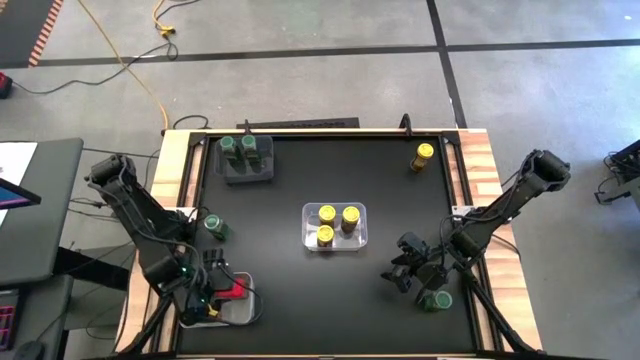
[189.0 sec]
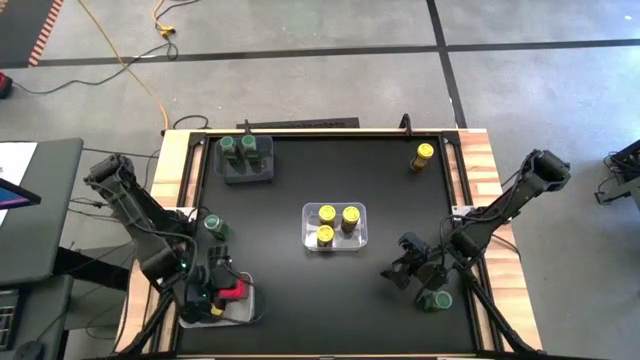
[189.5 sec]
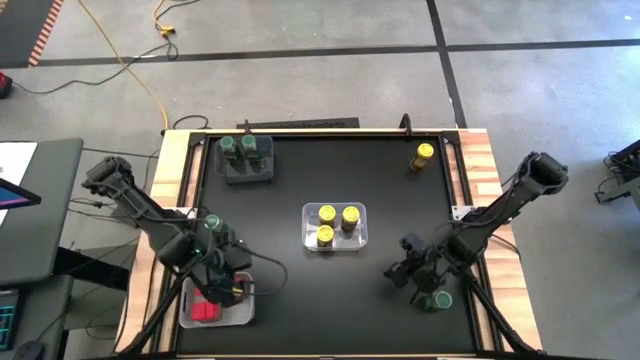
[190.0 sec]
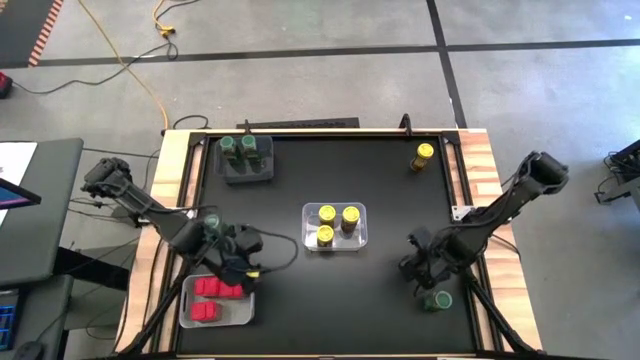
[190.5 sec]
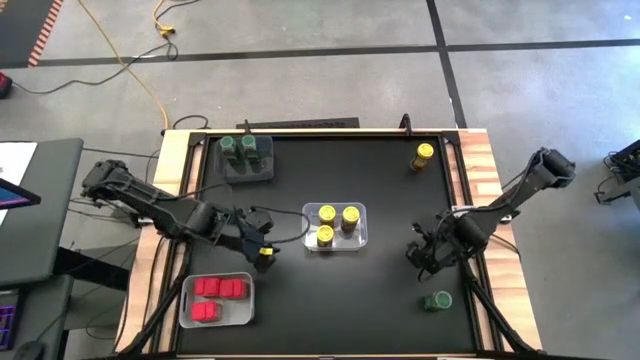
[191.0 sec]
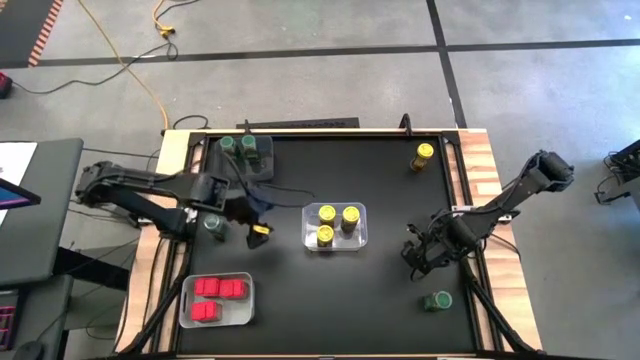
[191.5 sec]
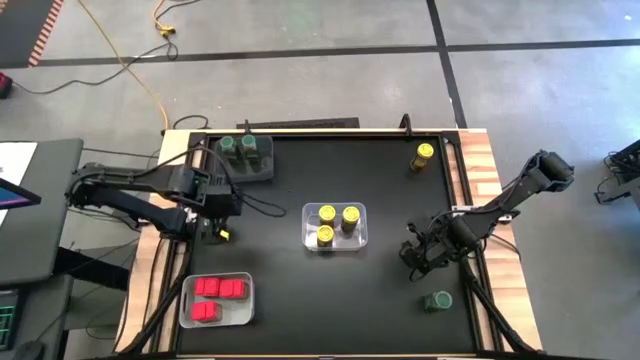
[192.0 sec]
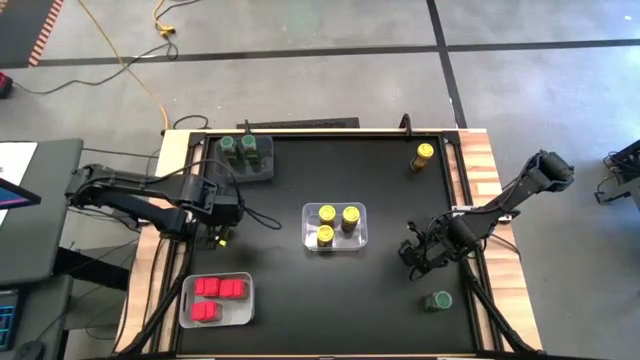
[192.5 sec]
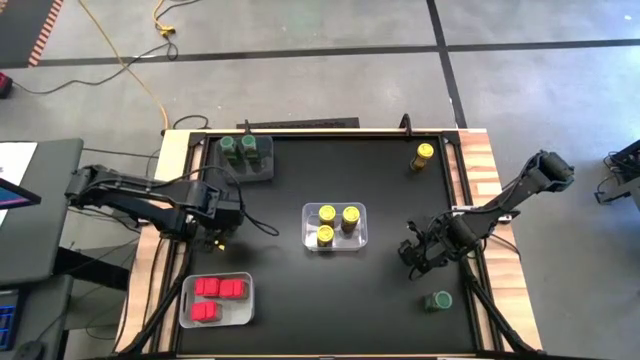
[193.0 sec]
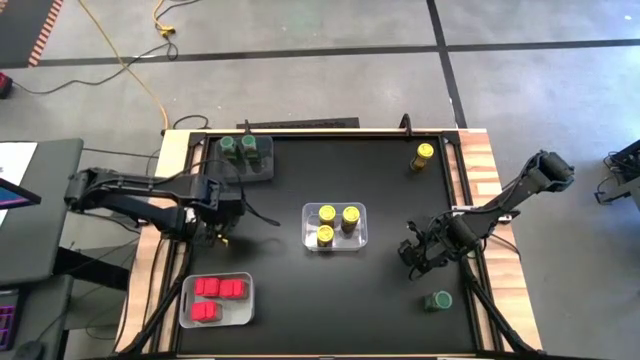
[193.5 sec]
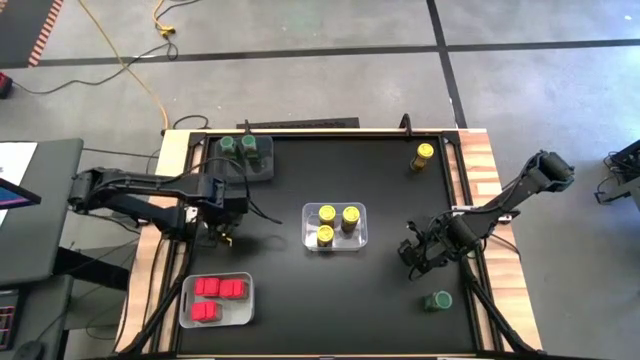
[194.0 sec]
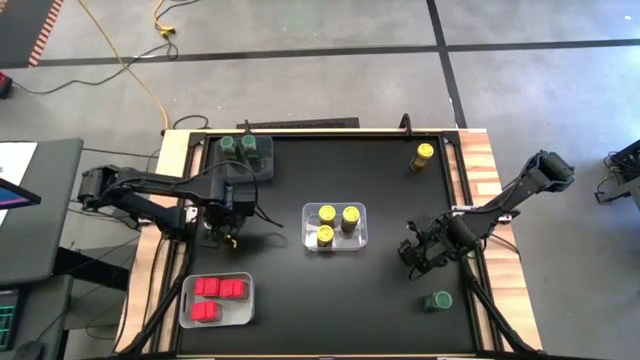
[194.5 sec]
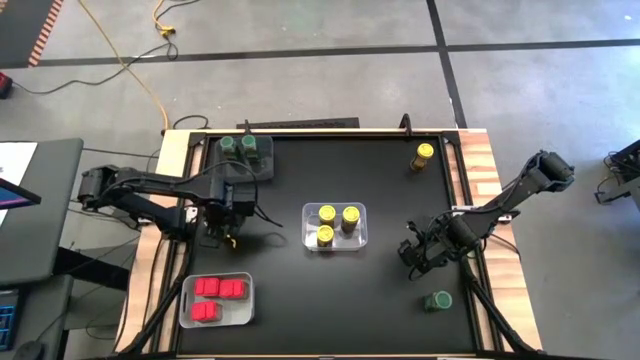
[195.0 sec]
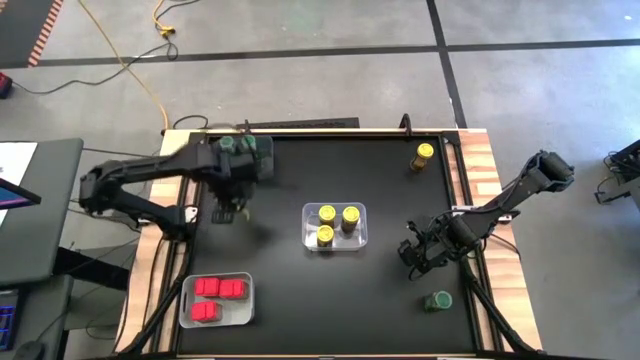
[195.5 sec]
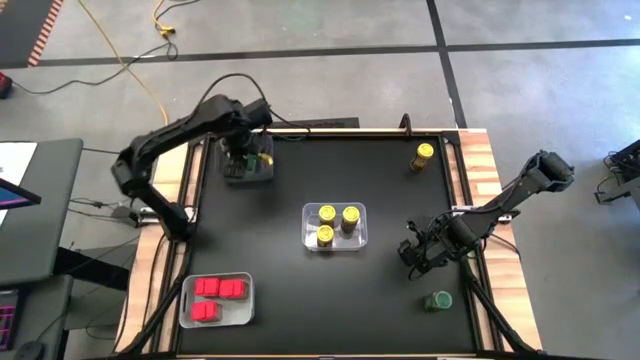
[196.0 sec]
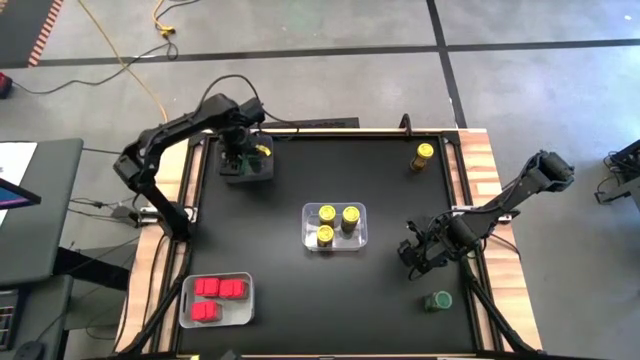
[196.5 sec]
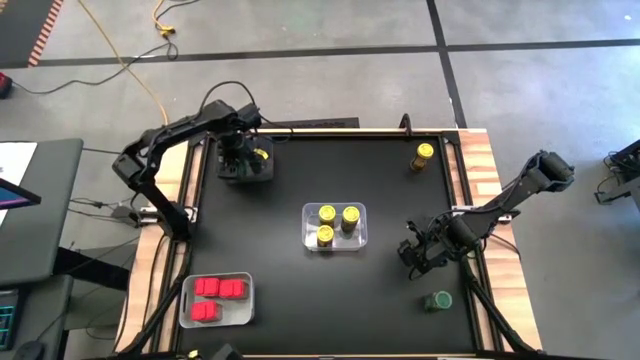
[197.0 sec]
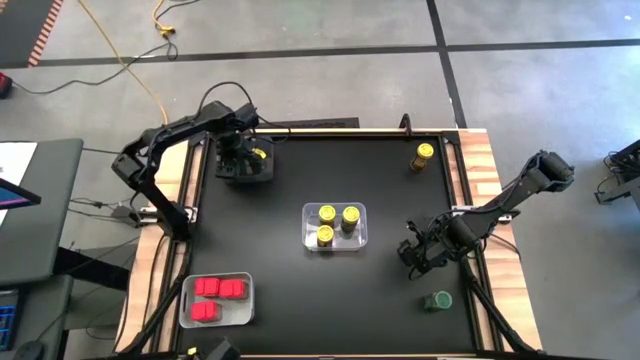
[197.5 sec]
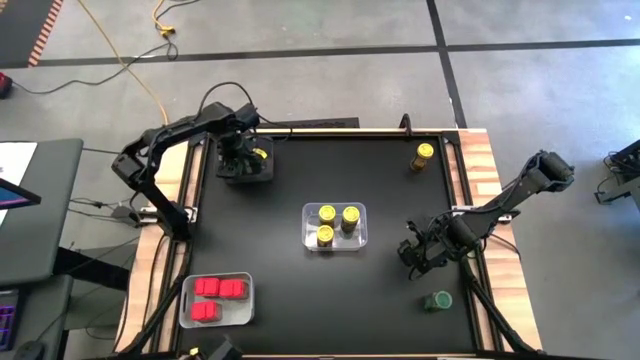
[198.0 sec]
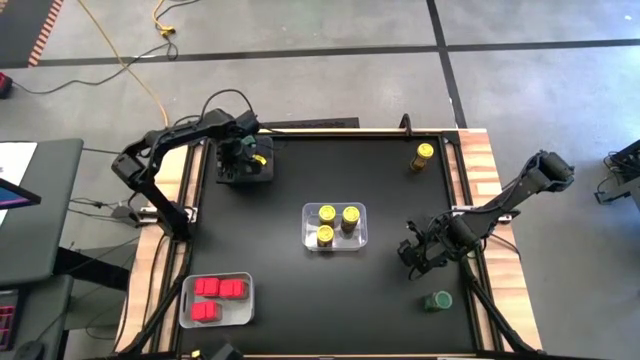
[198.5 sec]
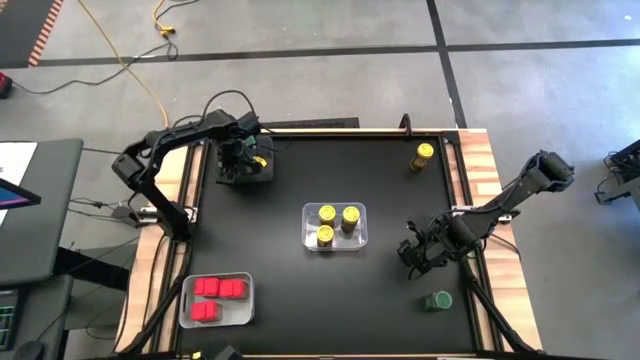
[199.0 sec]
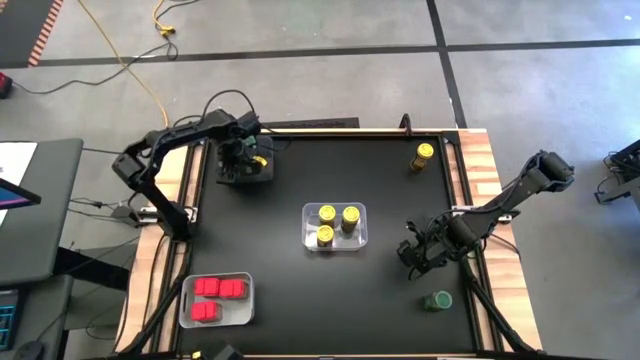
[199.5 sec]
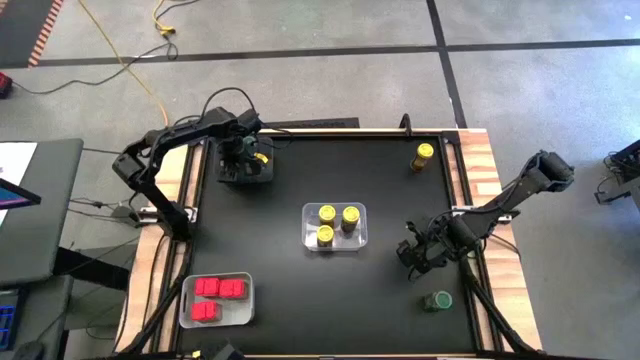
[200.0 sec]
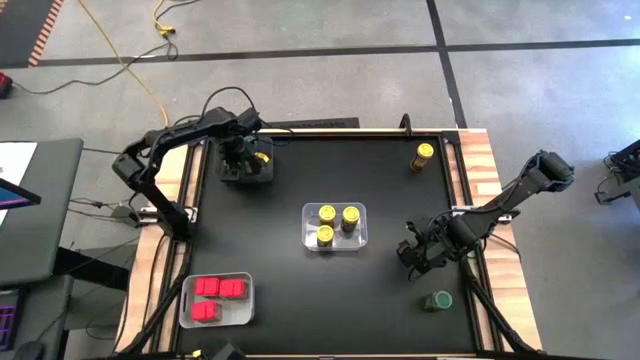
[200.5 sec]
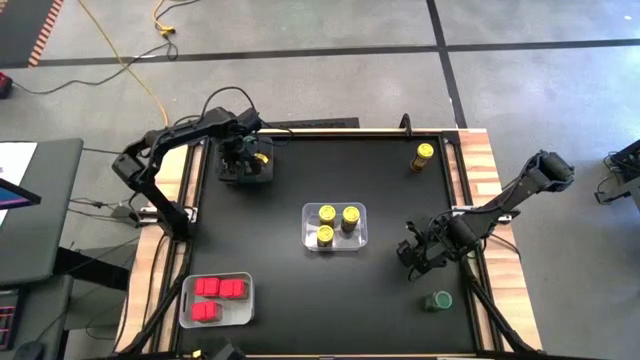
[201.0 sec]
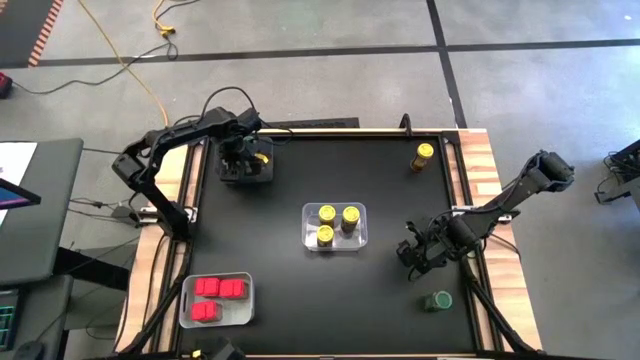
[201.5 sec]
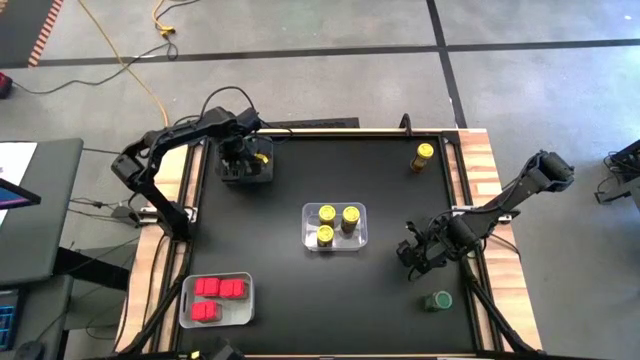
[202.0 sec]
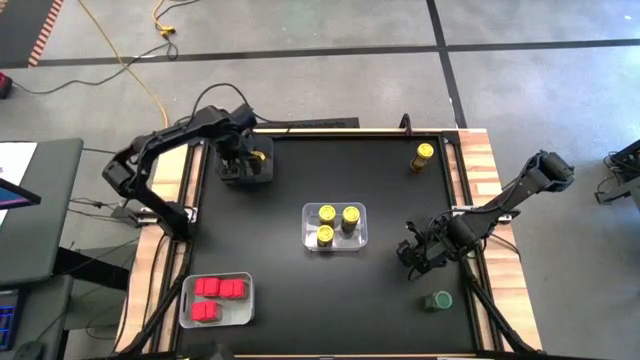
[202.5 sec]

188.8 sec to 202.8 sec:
Task: Sort spices by type
Put the green seasoning bottle into the transparent bin

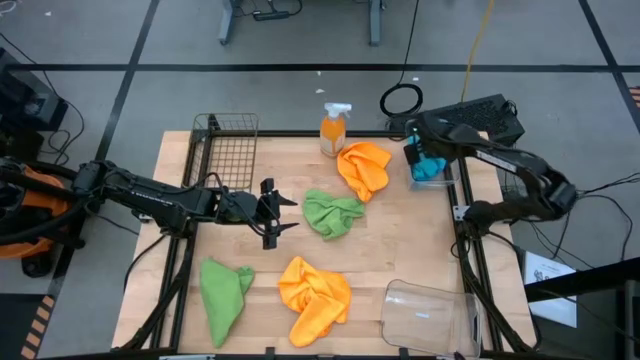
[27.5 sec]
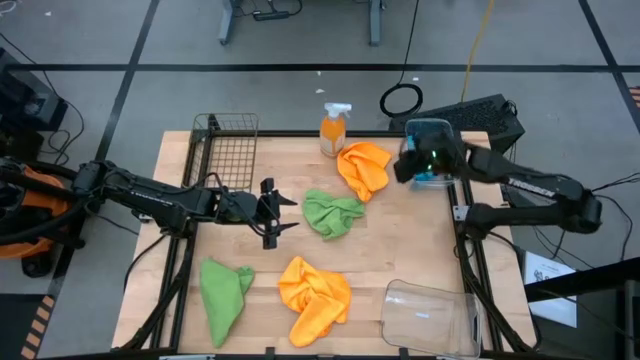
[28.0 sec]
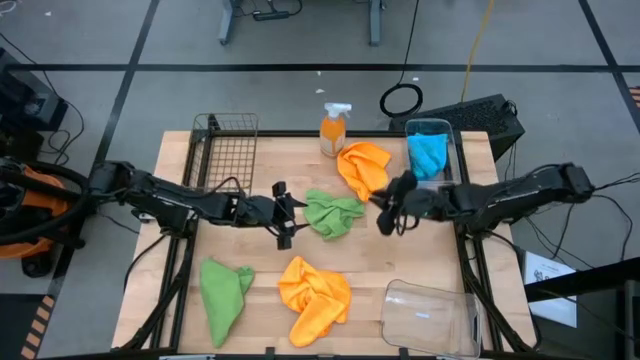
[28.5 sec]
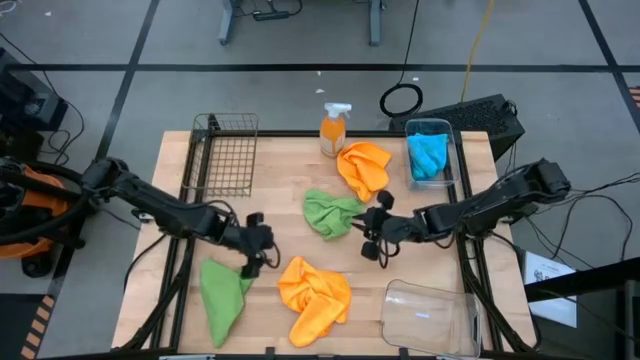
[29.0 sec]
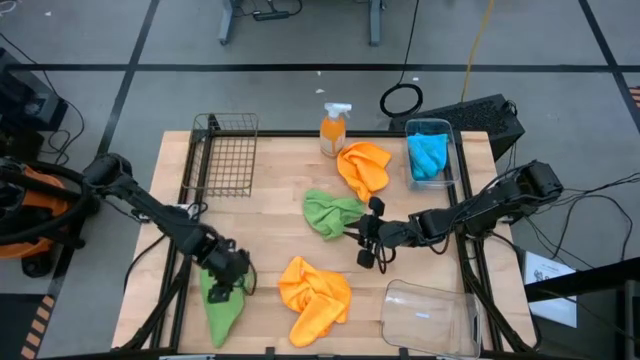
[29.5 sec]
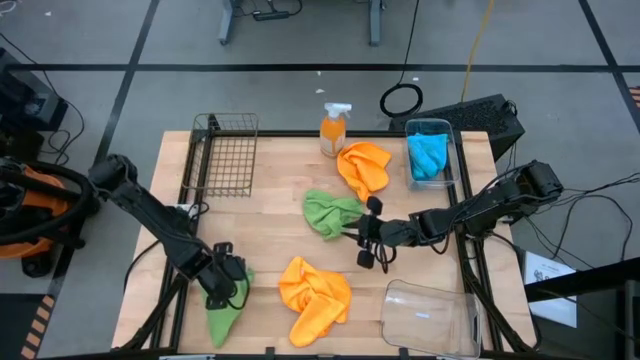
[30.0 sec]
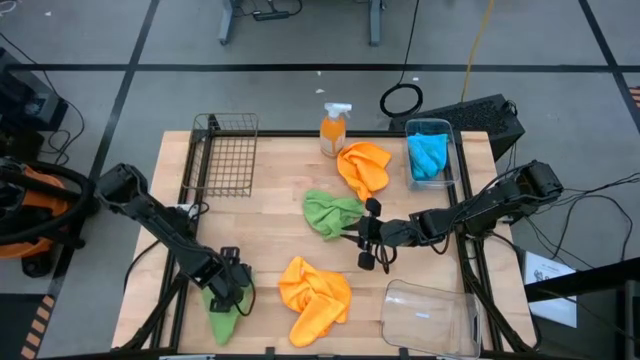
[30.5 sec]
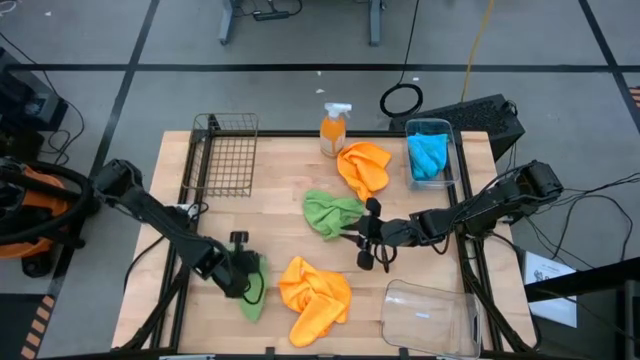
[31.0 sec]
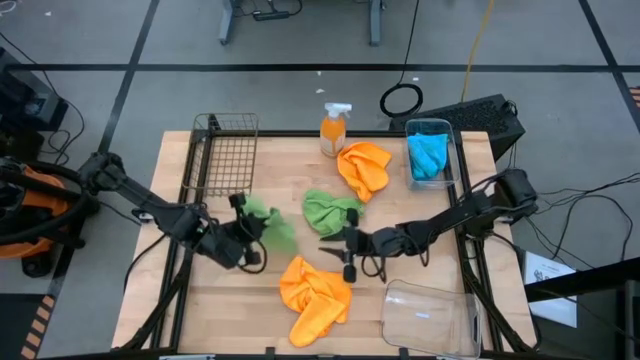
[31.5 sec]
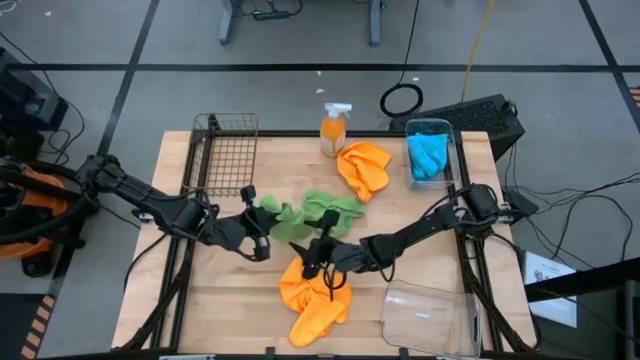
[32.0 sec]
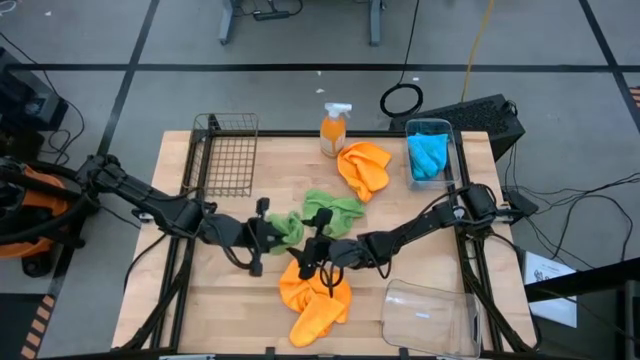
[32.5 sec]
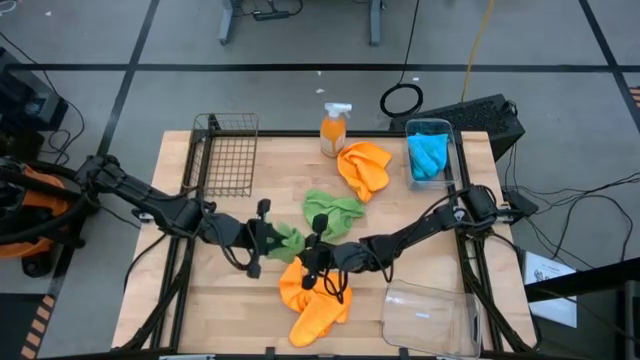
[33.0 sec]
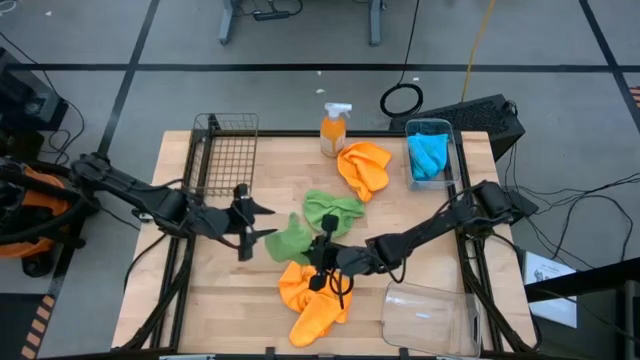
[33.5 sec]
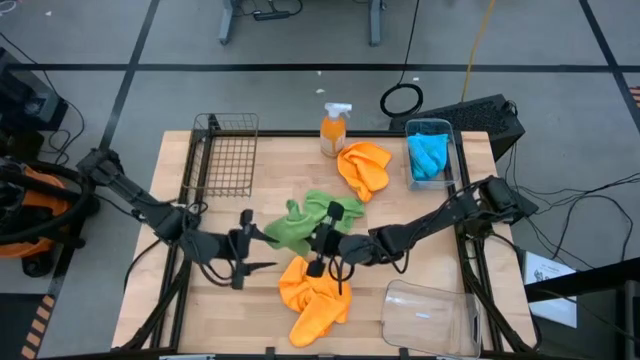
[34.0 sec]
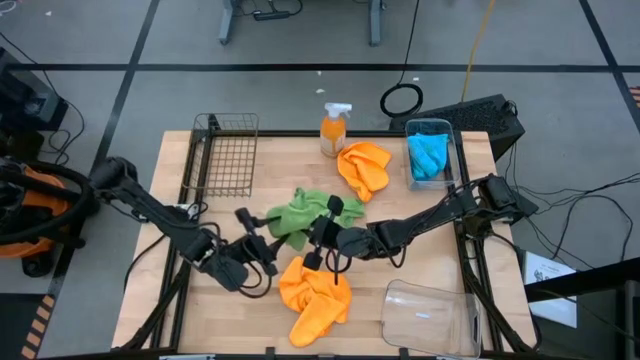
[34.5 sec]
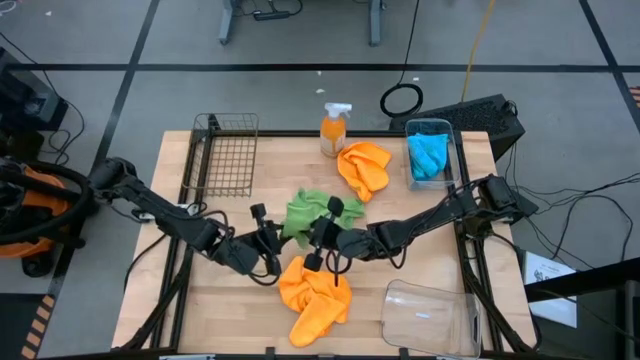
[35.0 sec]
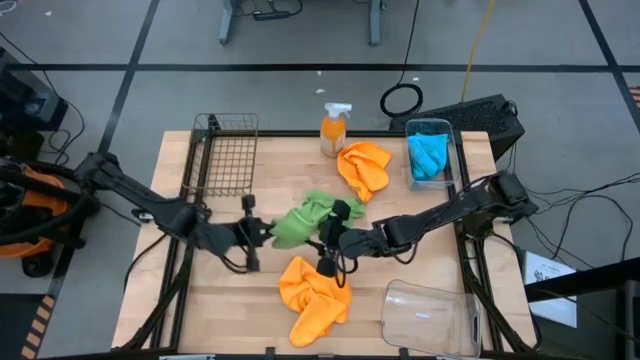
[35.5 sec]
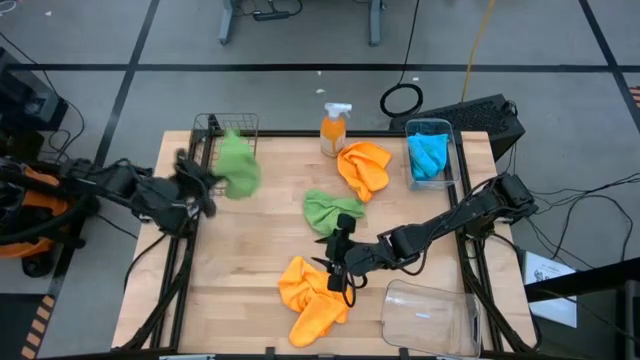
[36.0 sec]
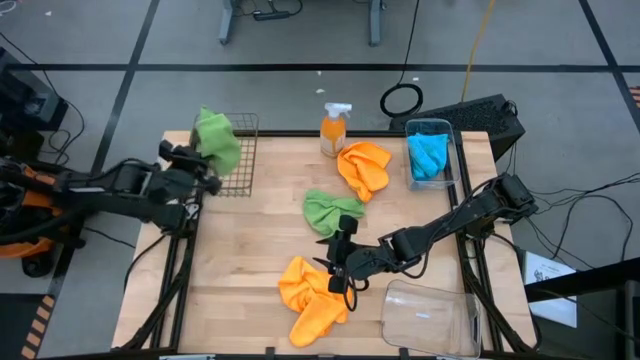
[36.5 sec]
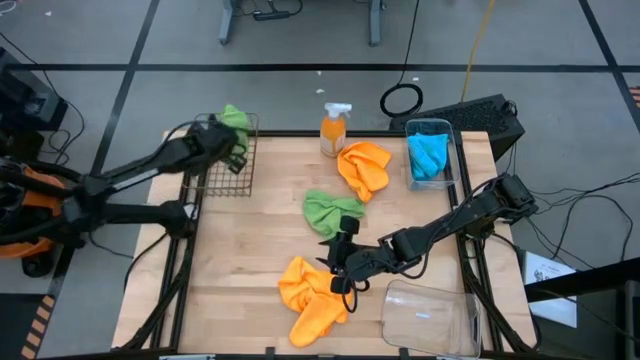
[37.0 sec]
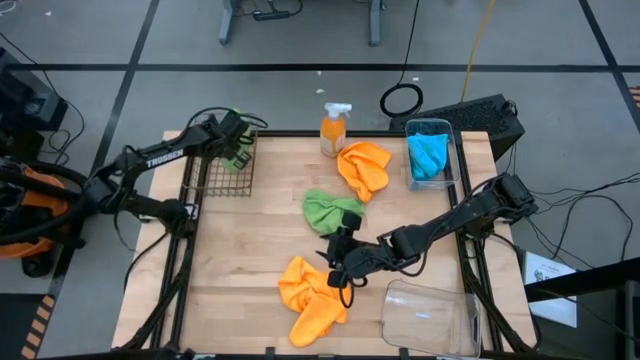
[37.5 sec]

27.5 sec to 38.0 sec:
Task: Sort microfiber towel by color & place in baskets
Put the bottom green microfiber towel into the wire basket
